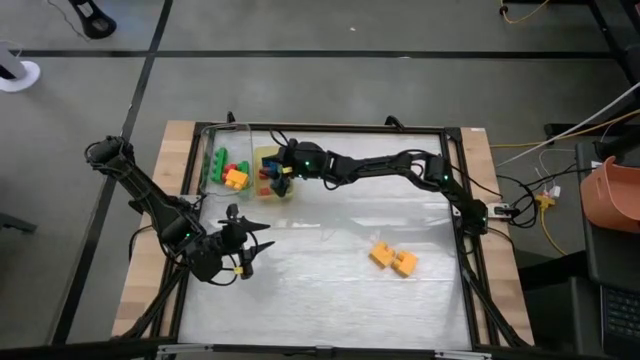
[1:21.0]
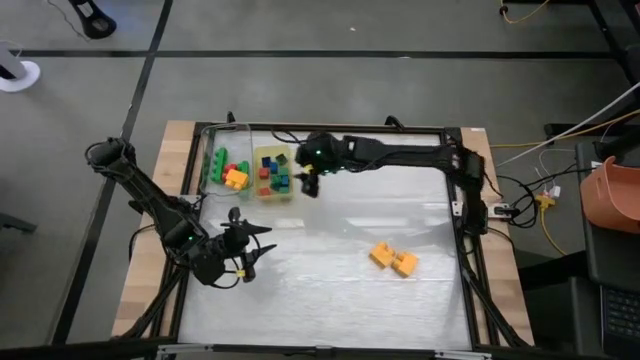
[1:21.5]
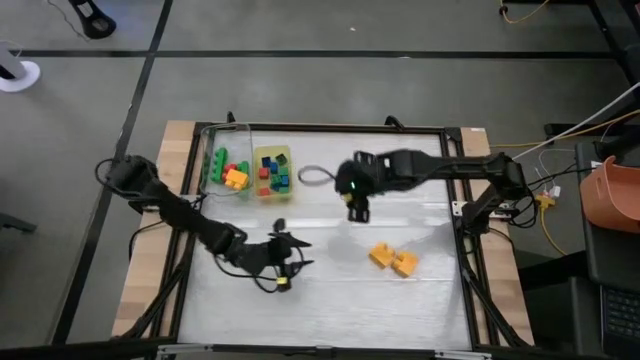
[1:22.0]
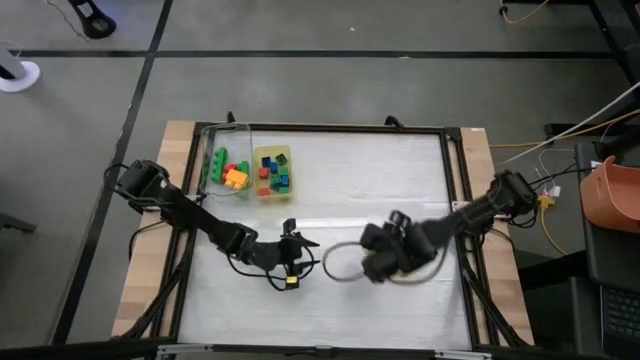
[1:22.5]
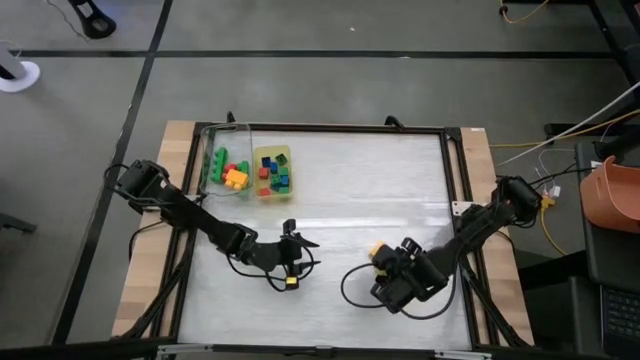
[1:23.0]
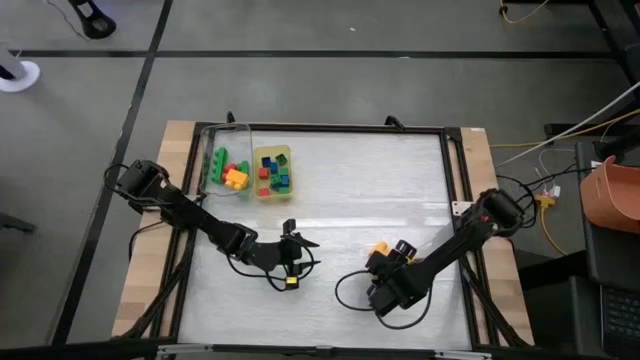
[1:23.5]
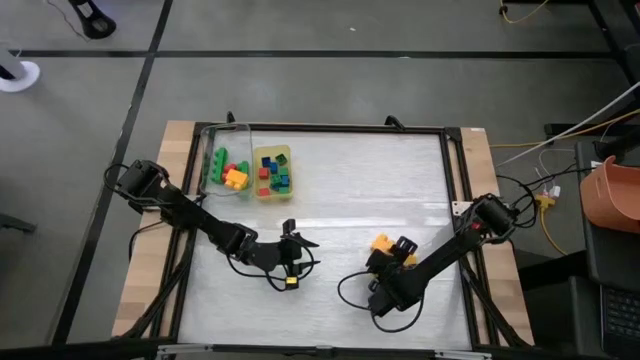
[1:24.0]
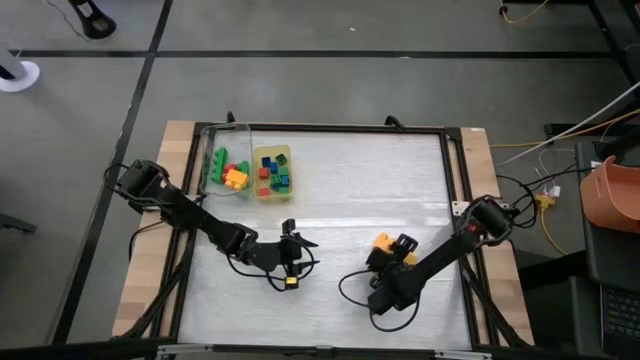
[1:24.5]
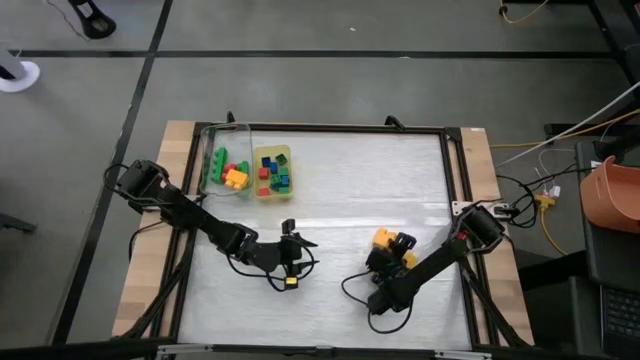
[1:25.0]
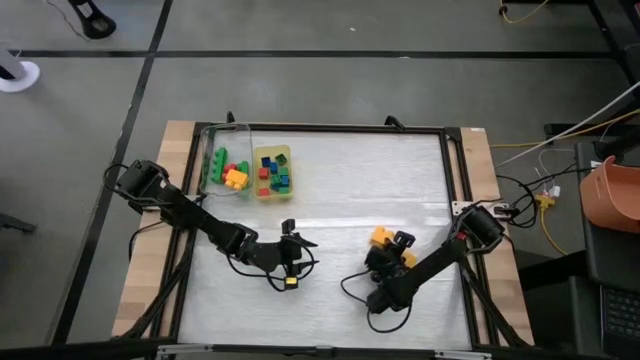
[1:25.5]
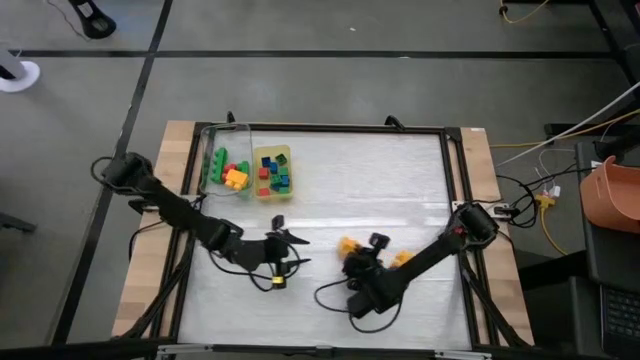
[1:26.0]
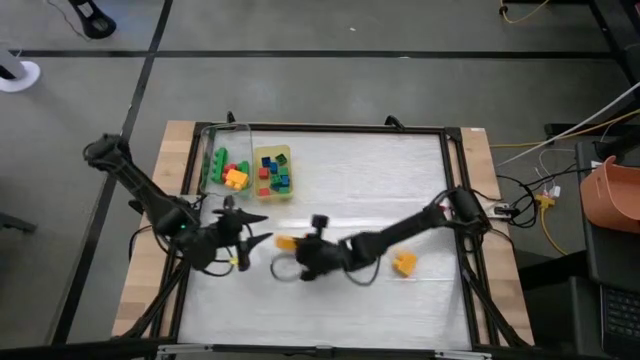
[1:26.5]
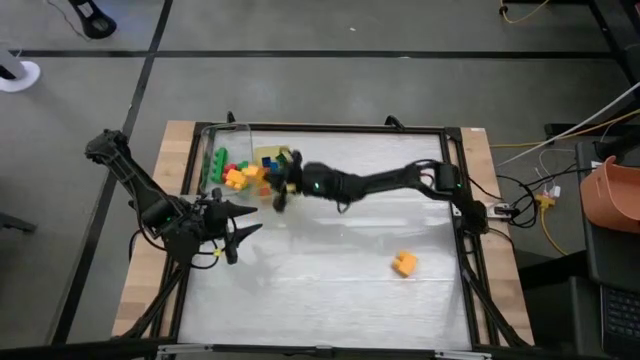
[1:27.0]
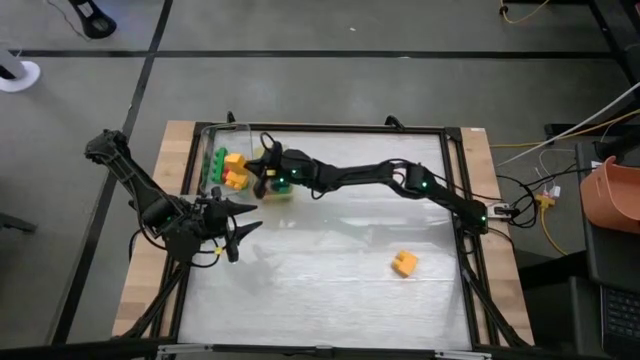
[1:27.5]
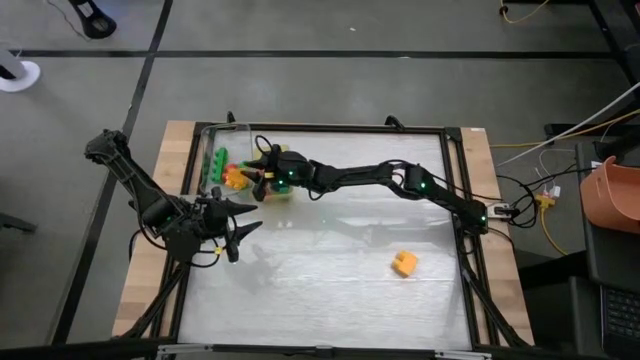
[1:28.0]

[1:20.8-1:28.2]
Task: Sort blocks by size
Put the large yellow game piece into the transparent bin

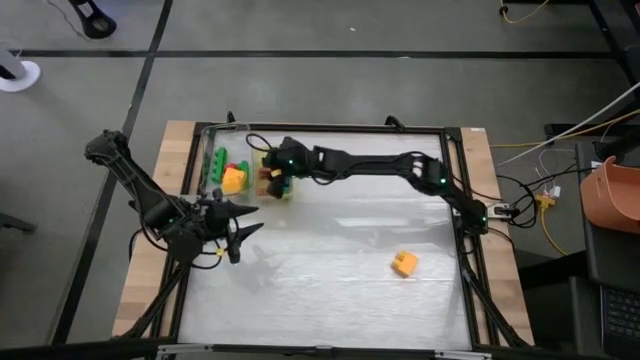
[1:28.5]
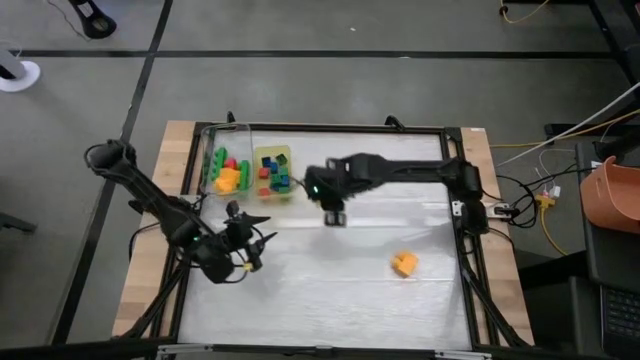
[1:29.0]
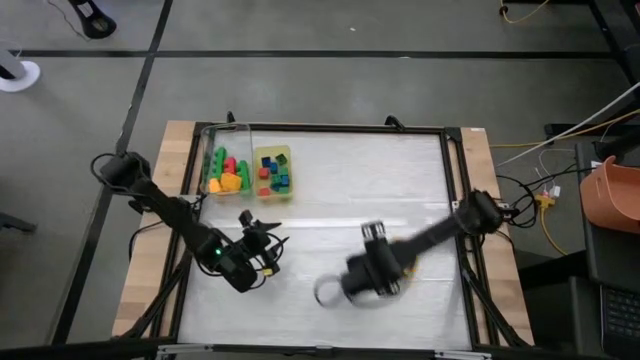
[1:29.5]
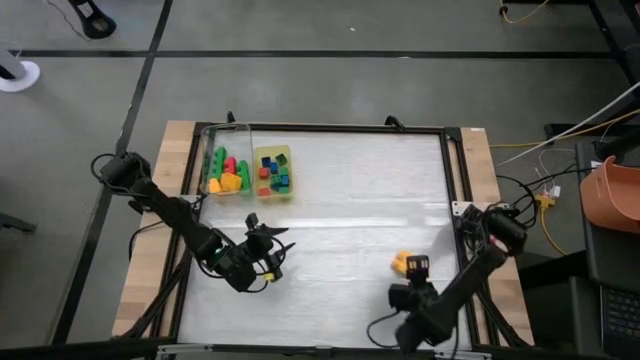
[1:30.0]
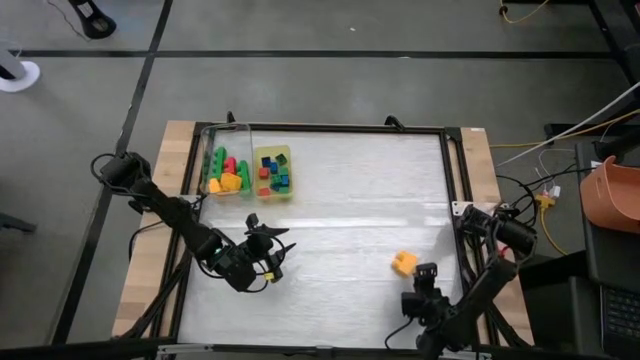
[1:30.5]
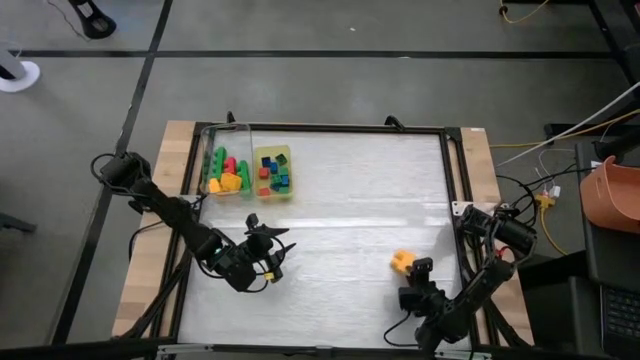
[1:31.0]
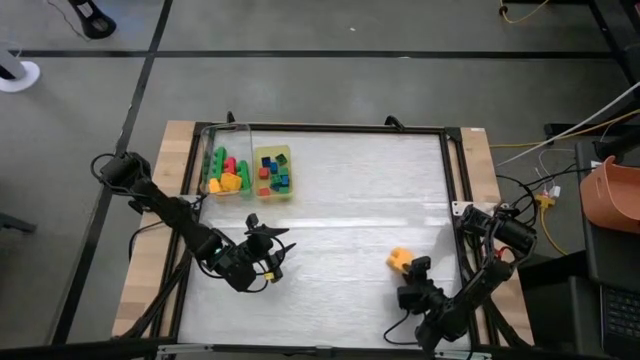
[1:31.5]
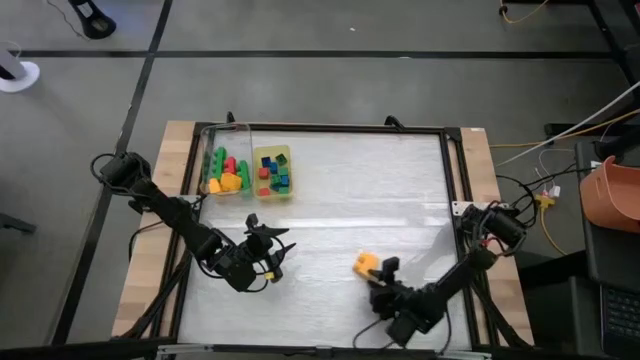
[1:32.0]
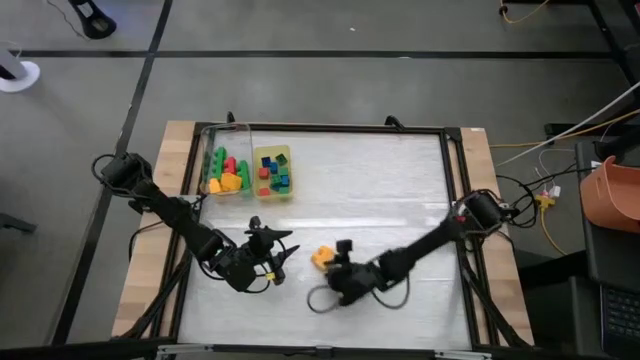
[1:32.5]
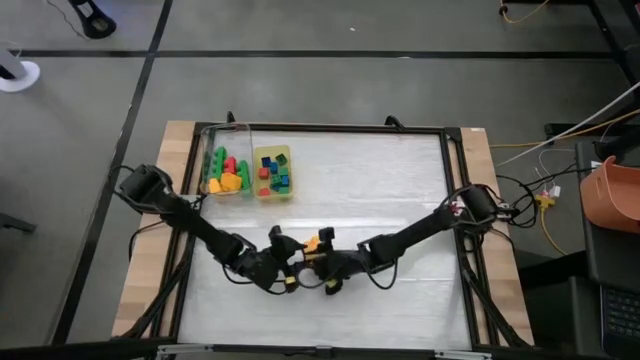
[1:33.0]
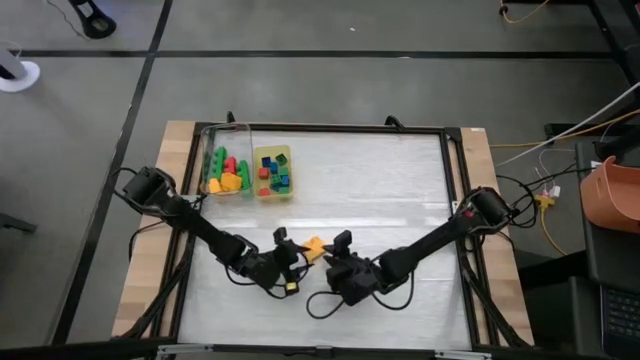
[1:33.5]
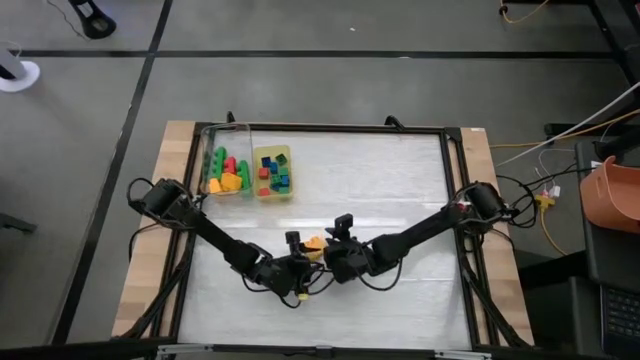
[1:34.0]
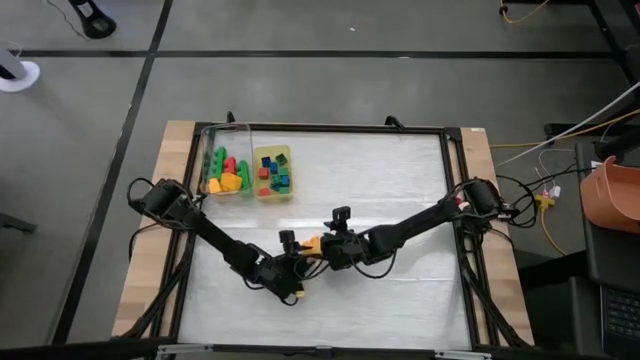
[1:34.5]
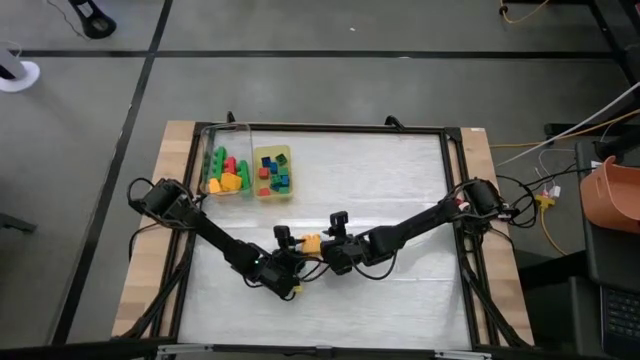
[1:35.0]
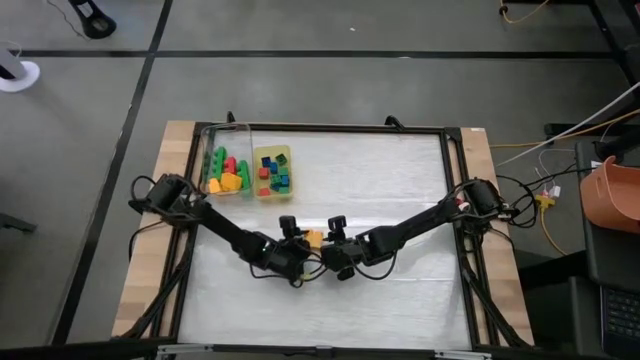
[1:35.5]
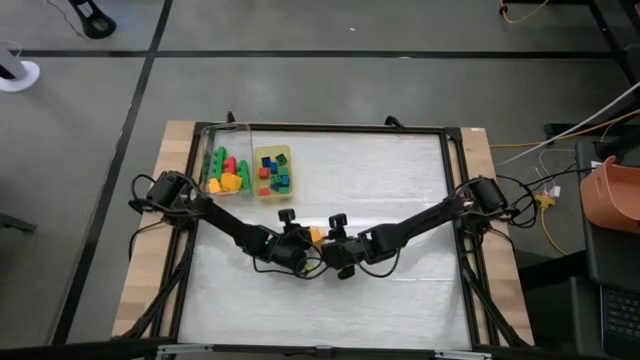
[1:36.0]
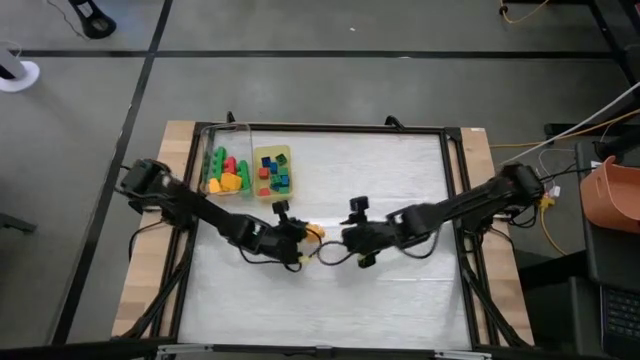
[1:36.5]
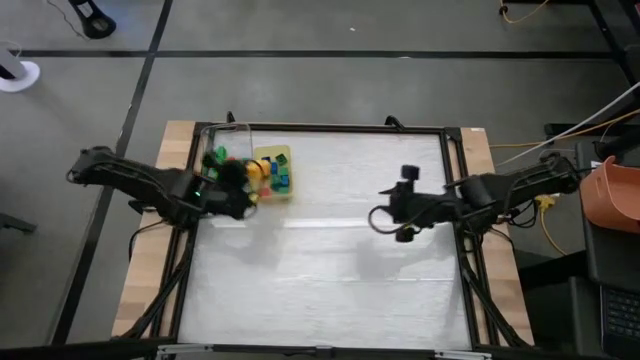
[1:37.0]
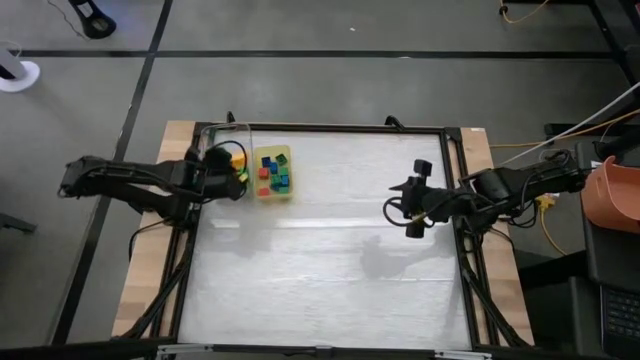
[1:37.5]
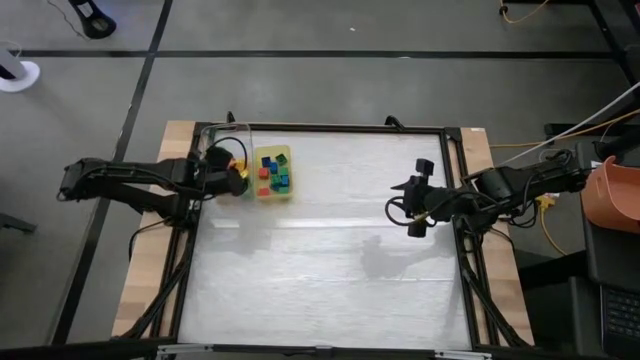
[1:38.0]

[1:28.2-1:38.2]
Put the large yellow game piece into the transparent bin

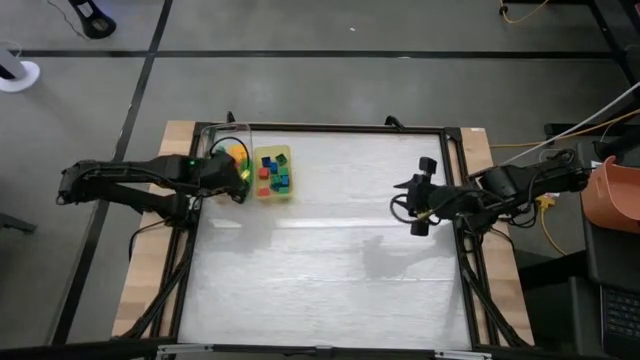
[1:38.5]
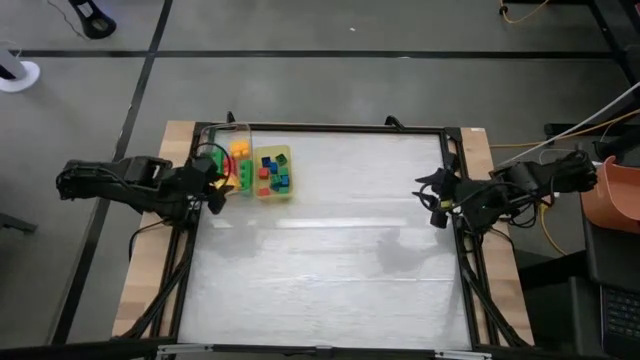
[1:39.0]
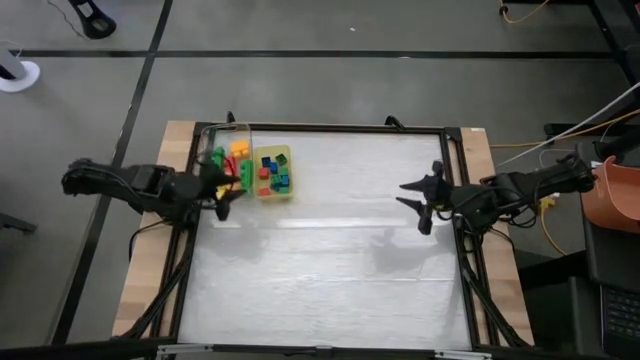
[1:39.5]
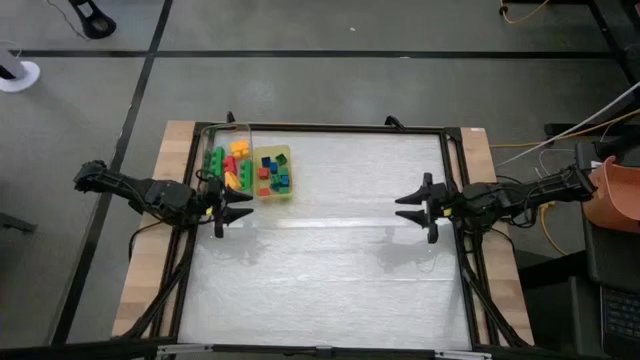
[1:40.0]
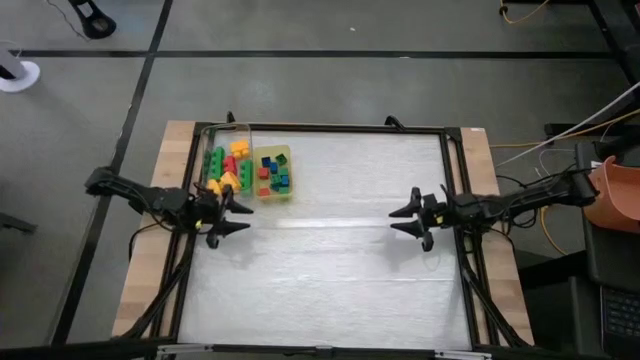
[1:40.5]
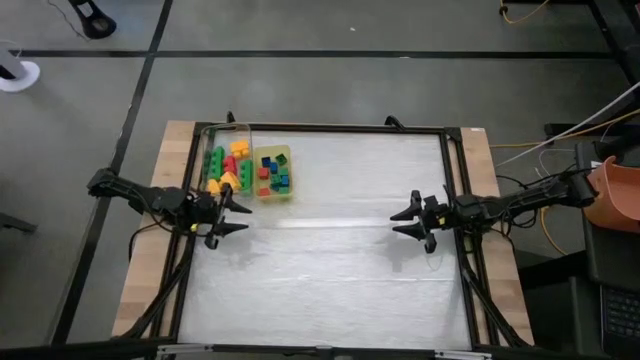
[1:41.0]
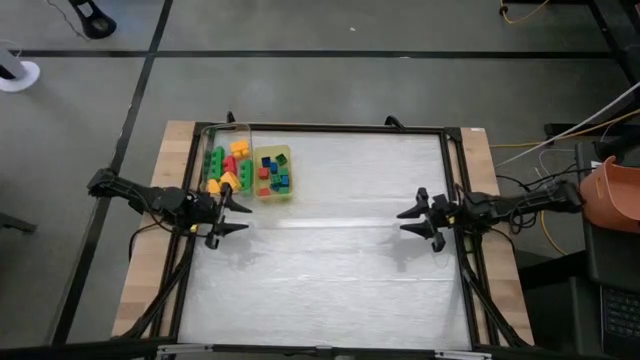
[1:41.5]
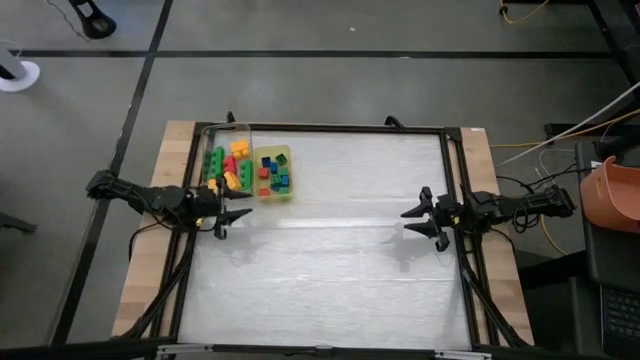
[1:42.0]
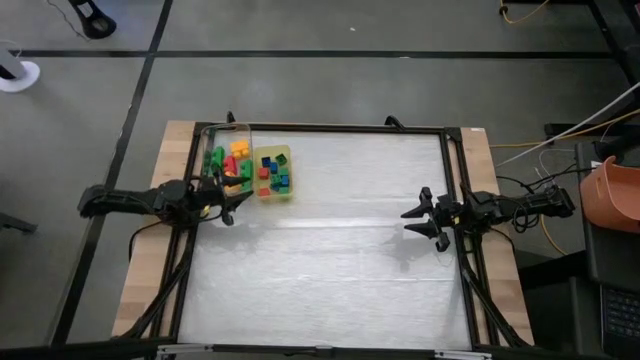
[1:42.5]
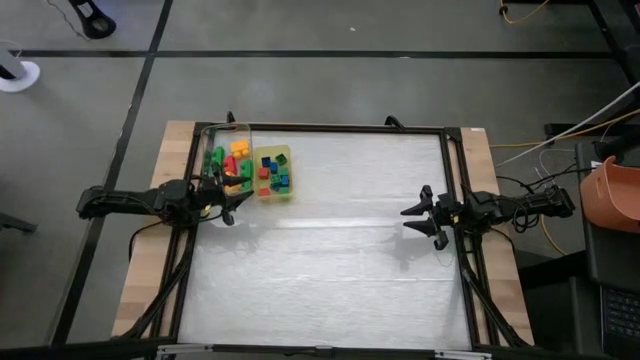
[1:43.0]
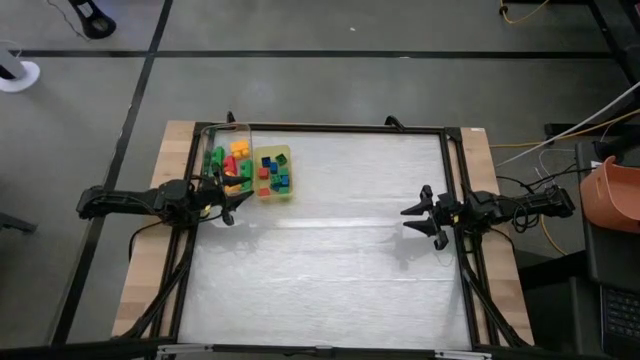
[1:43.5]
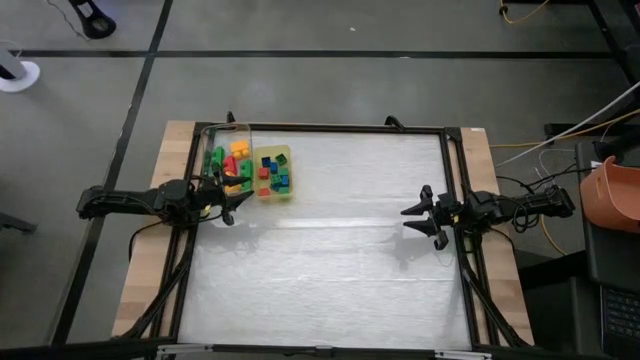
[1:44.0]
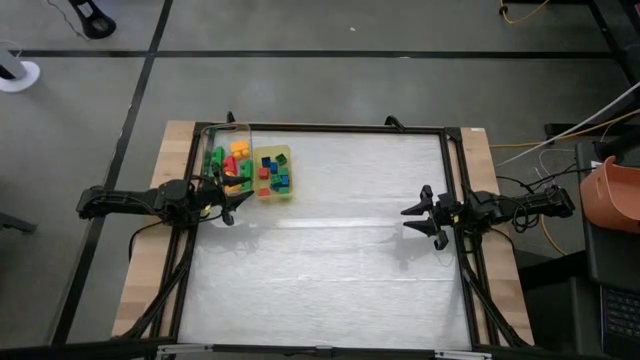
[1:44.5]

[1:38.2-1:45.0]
Return to Home Position
